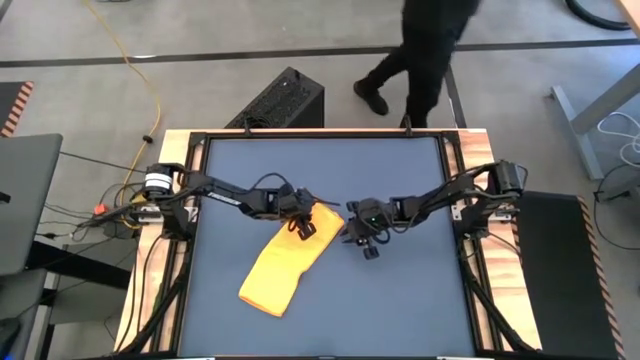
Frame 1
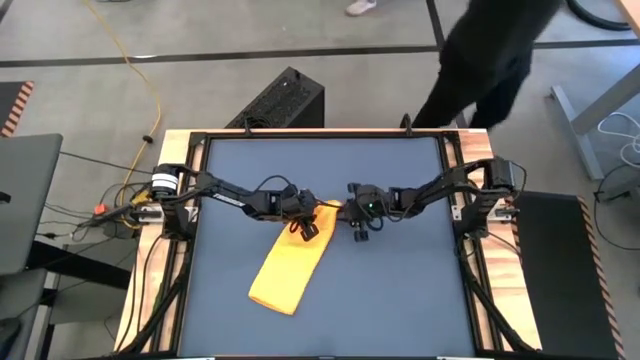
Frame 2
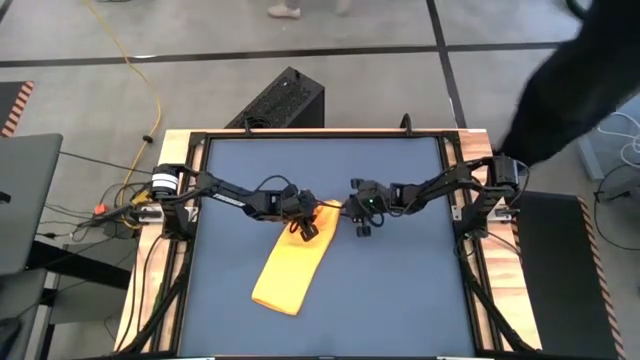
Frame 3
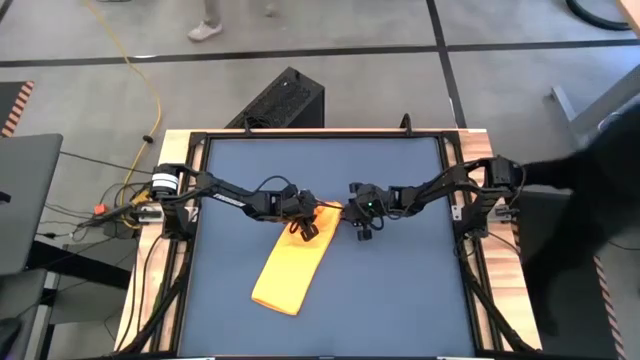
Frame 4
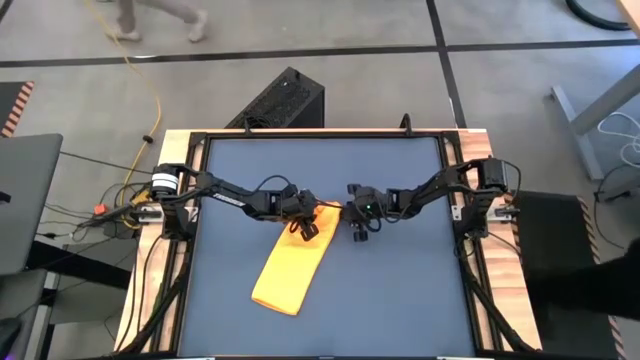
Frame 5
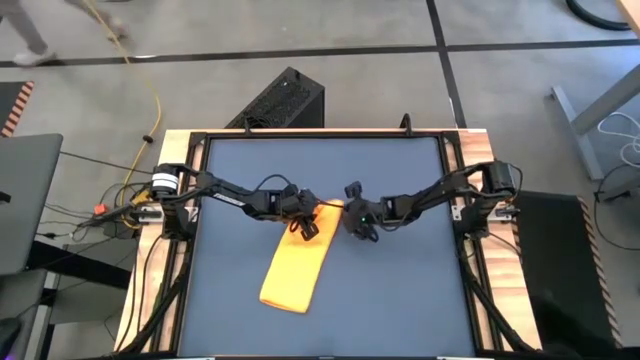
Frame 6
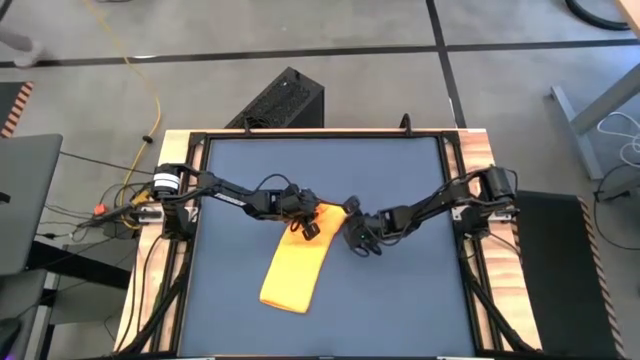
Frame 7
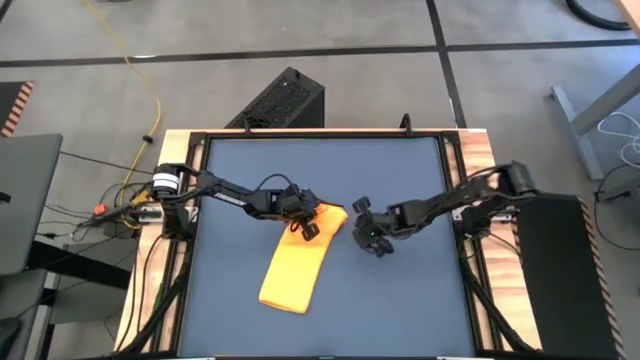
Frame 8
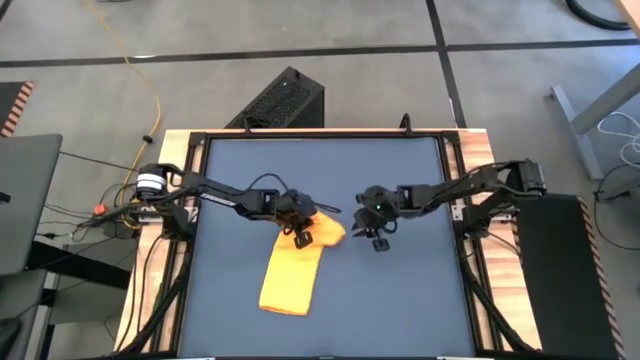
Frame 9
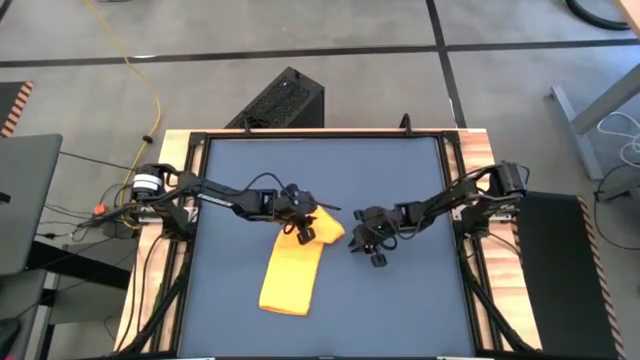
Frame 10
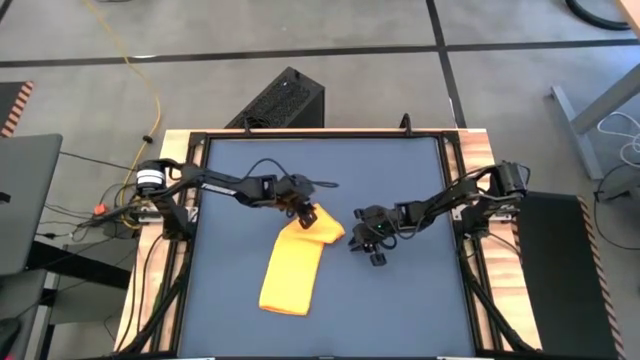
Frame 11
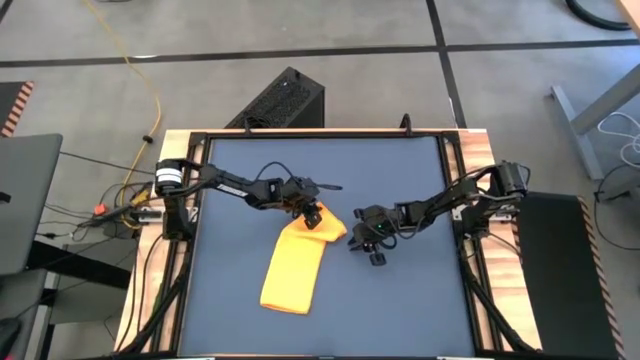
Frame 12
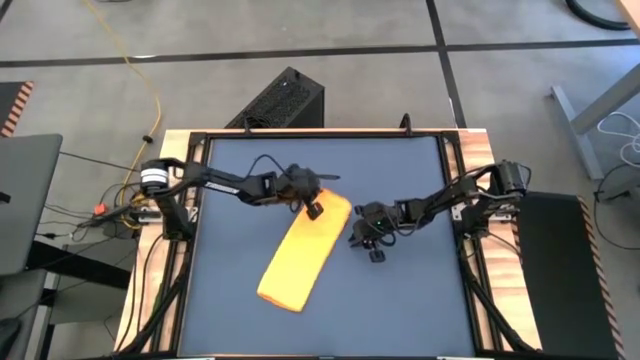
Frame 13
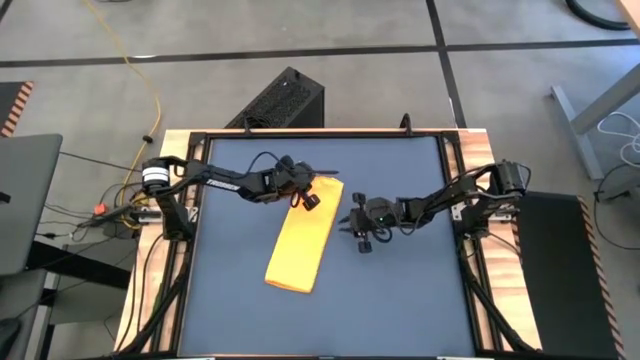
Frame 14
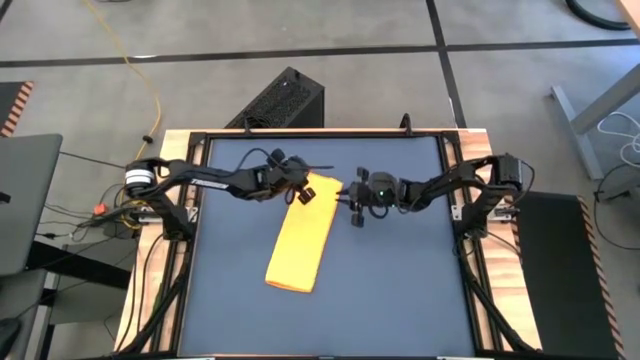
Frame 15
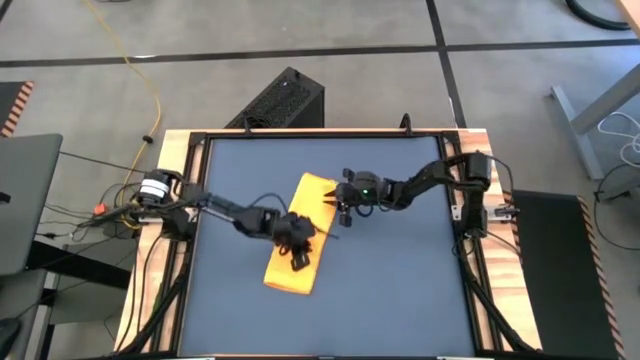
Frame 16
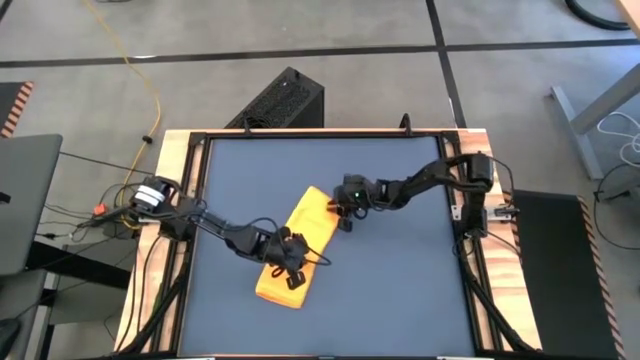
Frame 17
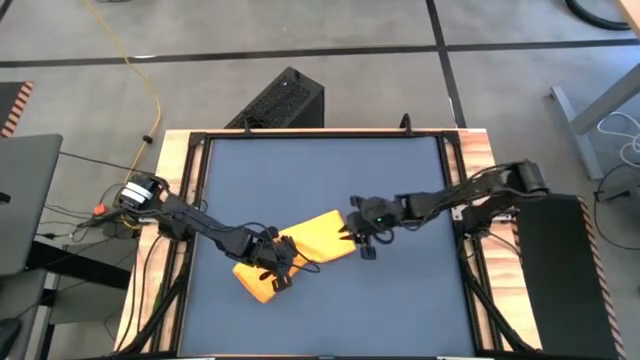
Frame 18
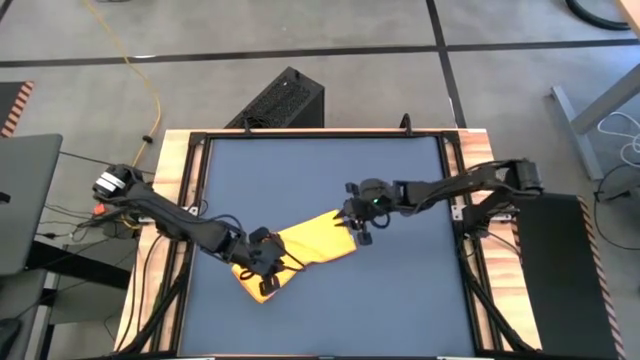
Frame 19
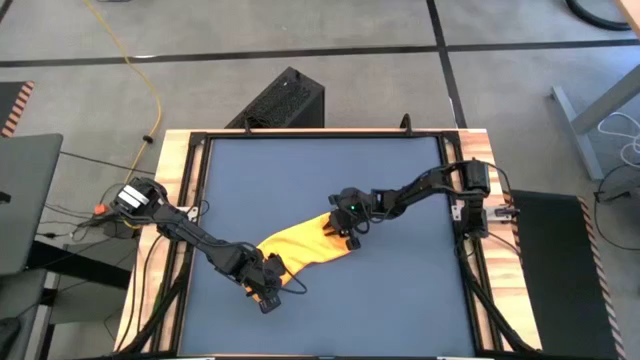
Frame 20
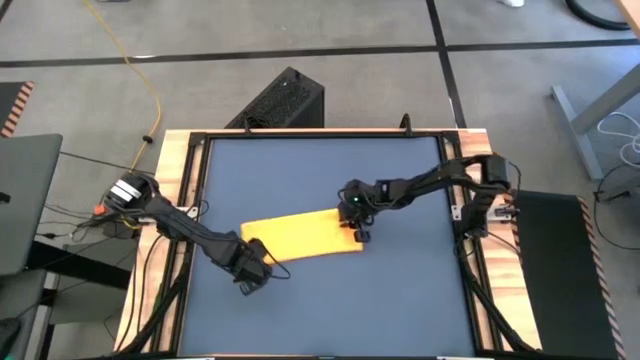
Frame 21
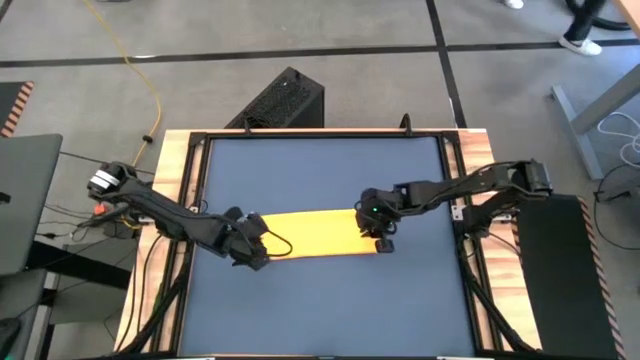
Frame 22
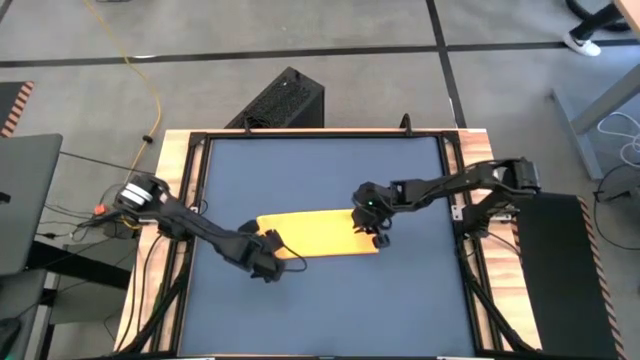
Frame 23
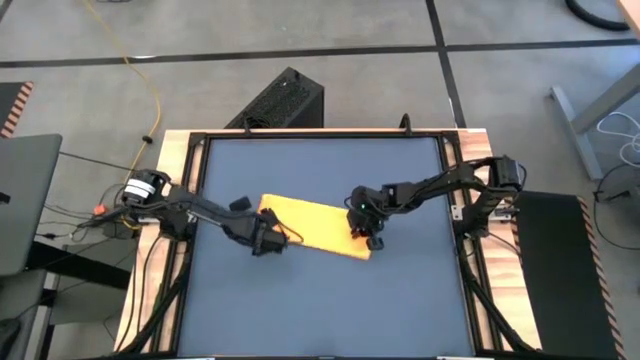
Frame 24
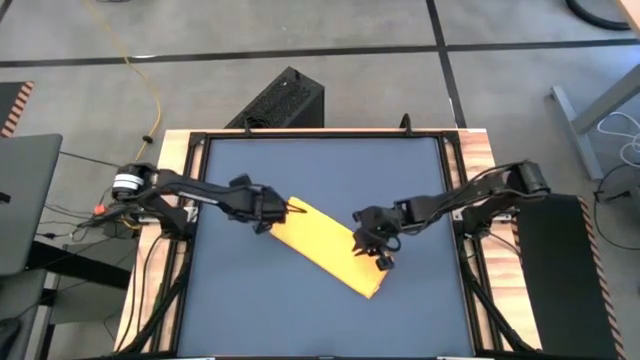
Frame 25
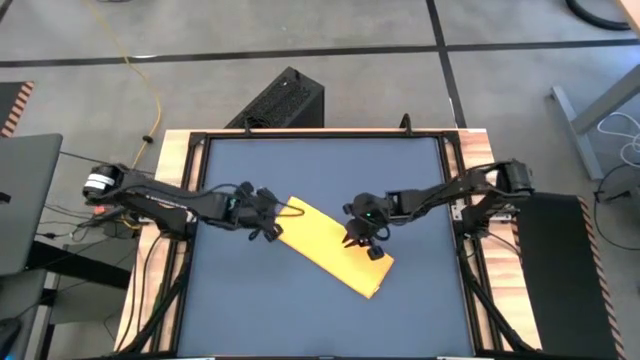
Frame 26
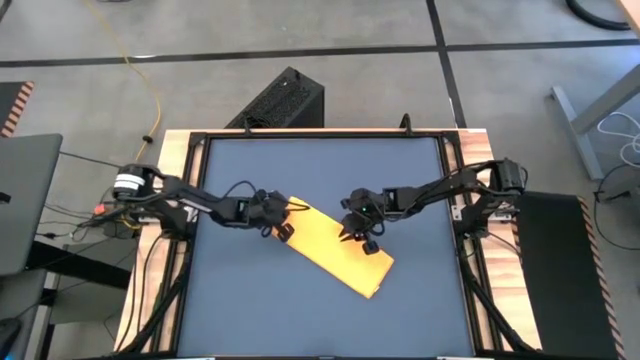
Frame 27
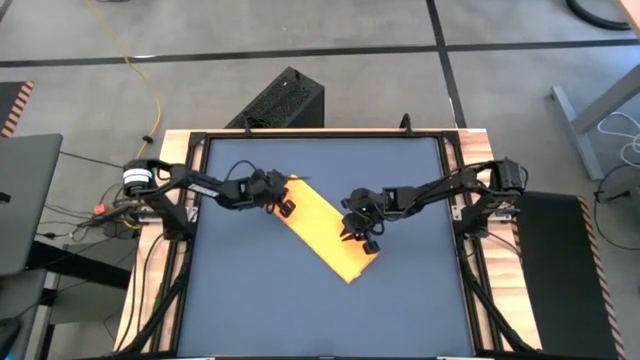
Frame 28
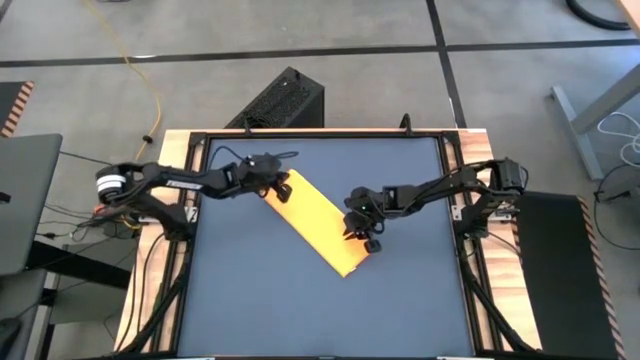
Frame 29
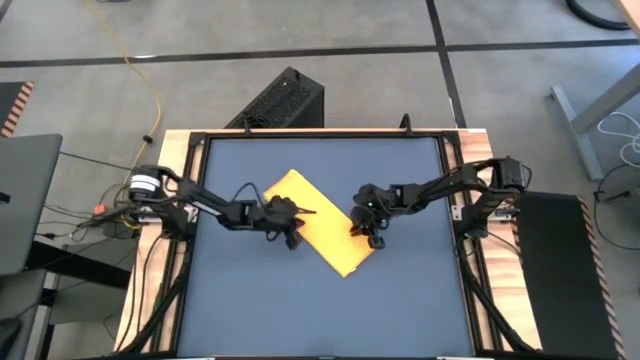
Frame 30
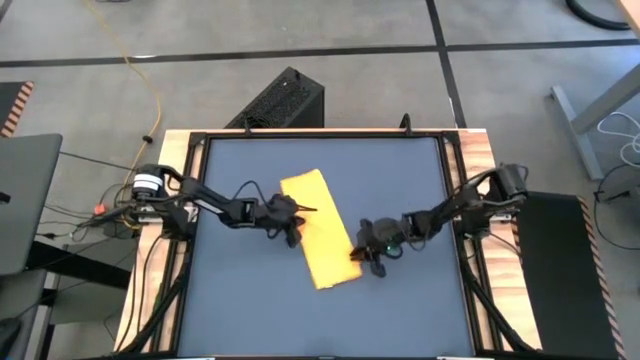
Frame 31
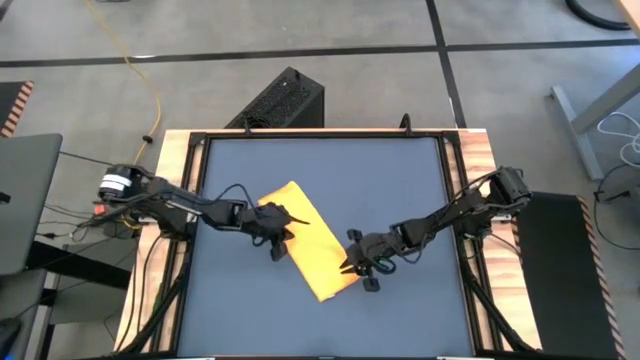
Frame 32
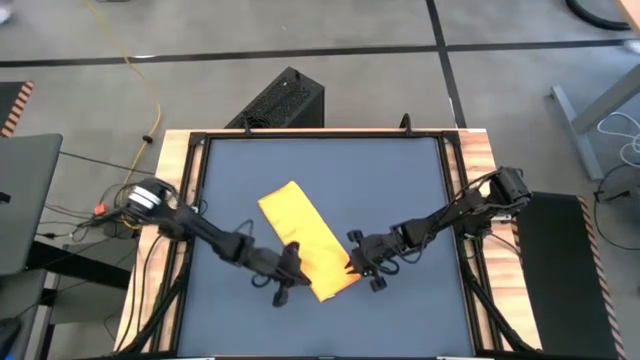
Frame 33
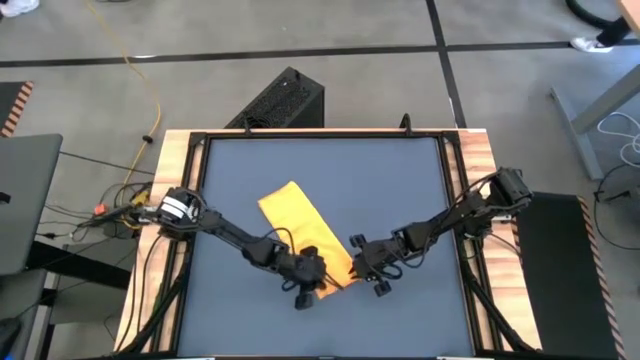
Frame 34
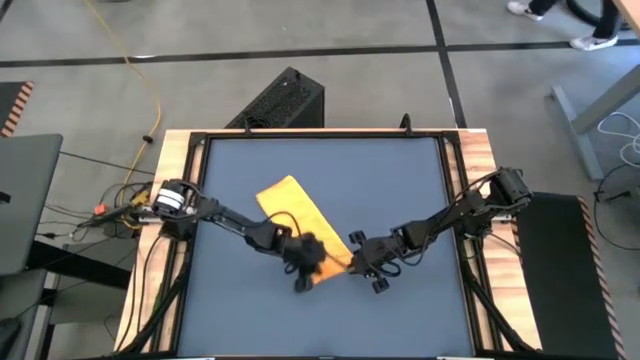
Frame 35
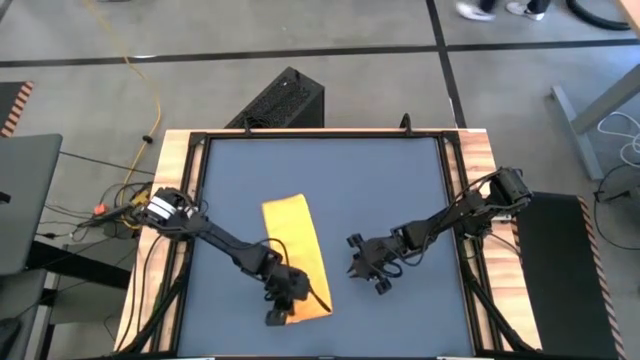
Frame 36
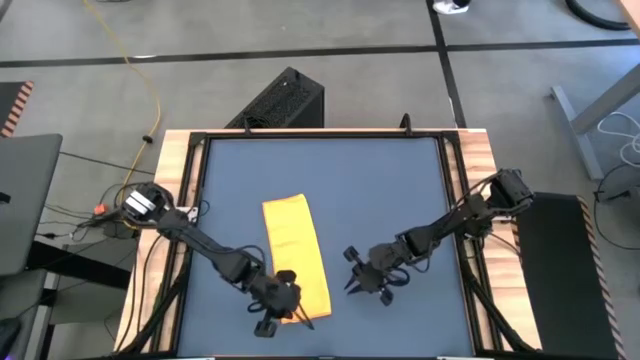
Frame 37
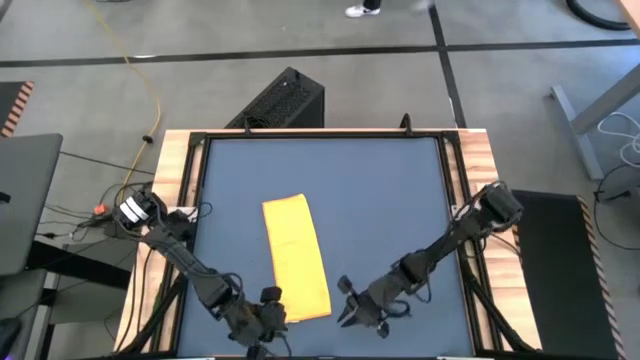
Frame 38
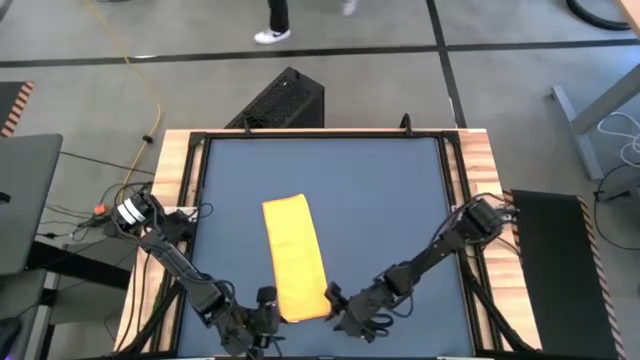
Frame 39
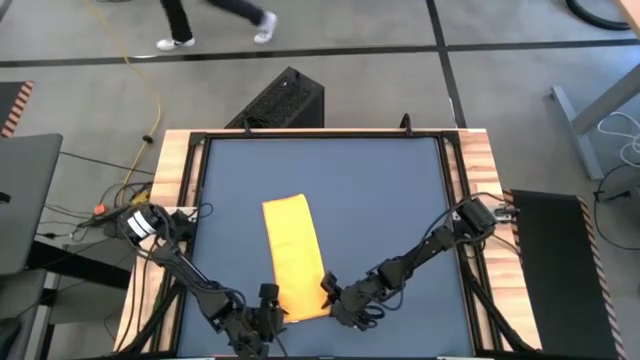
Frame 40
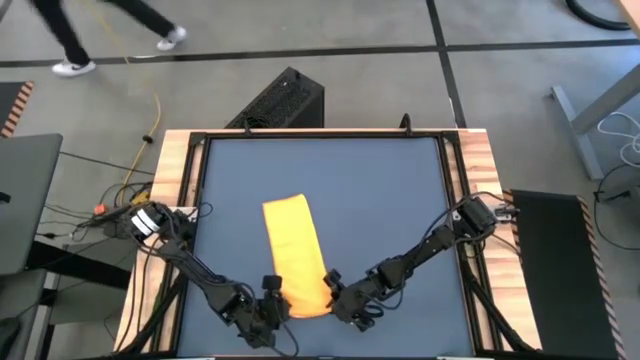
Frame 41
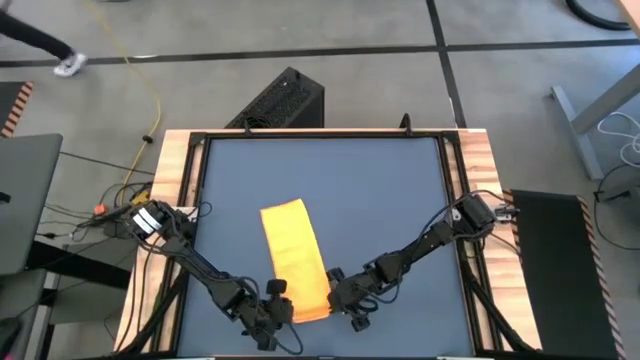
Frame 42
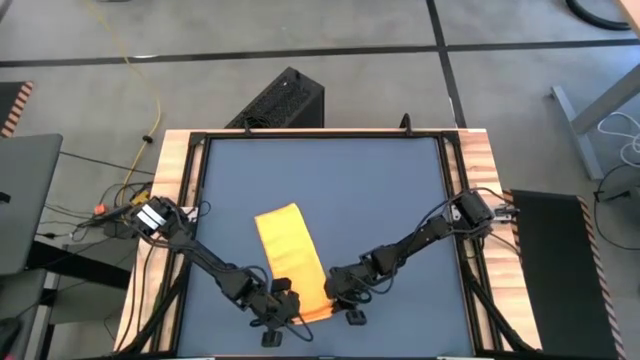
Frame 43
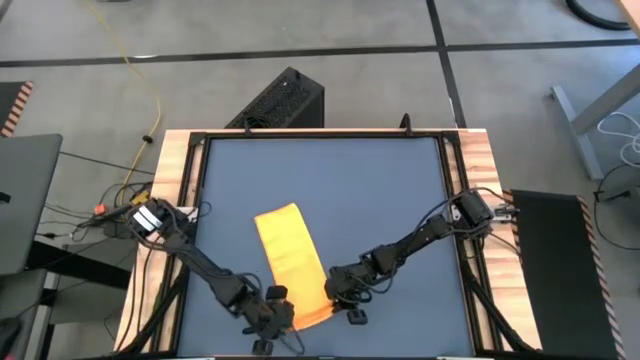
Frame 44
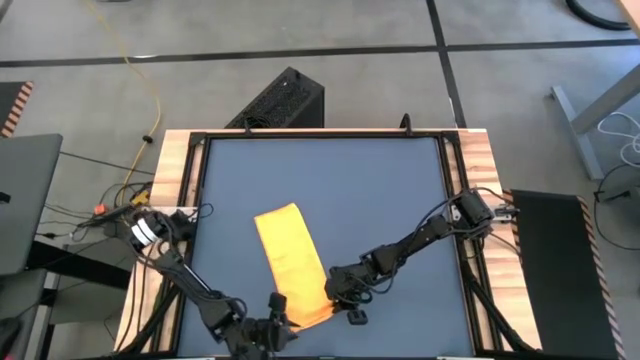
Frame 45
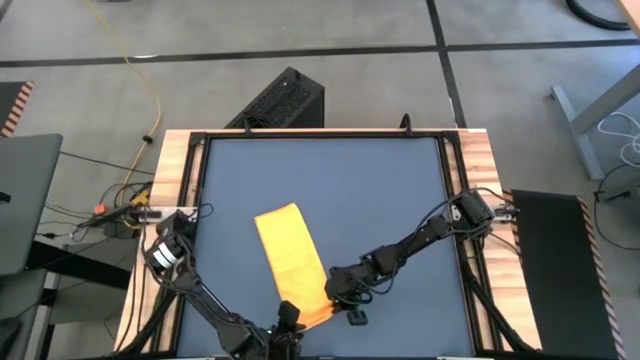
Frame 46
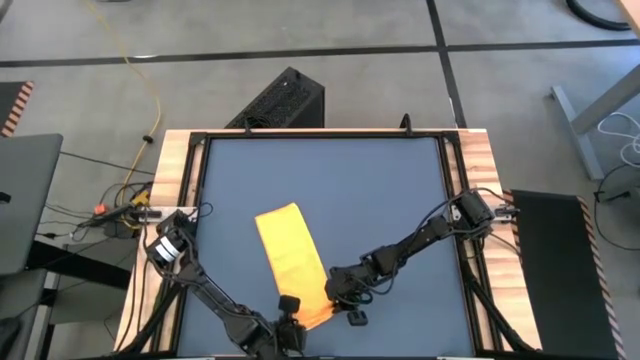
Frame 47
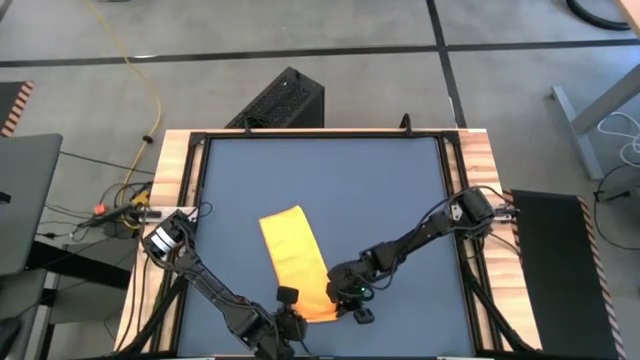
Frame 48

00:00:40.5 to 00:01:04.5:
Task: Roll towel into tight, uniform cylinder
Roll the orange microfiber towel
